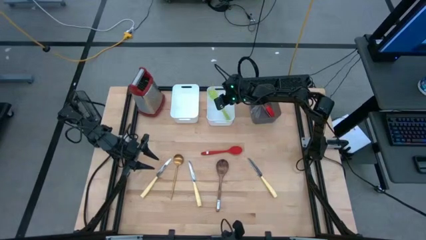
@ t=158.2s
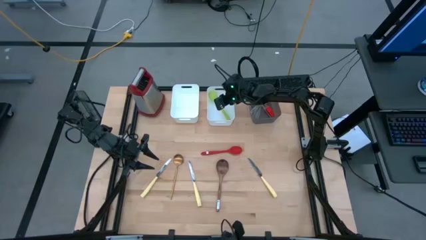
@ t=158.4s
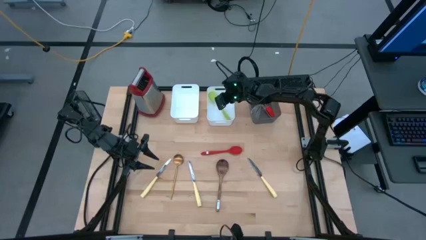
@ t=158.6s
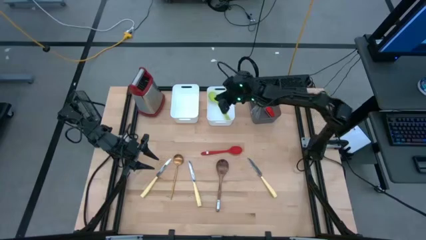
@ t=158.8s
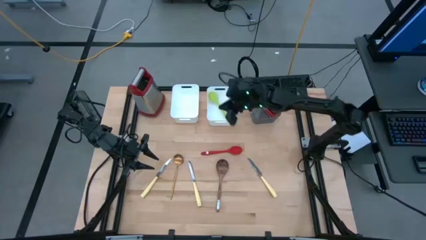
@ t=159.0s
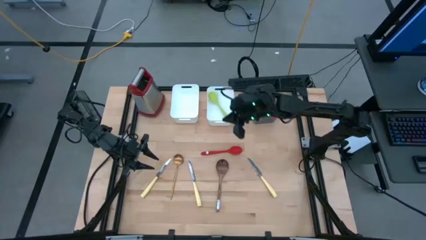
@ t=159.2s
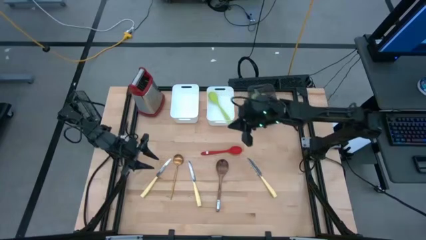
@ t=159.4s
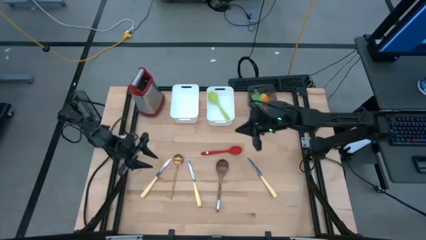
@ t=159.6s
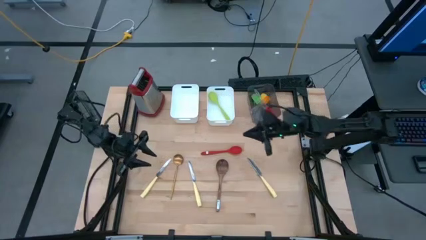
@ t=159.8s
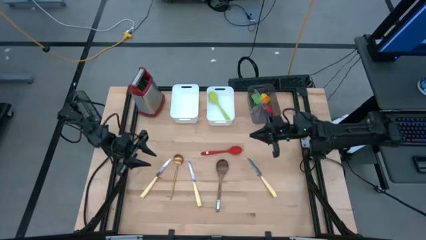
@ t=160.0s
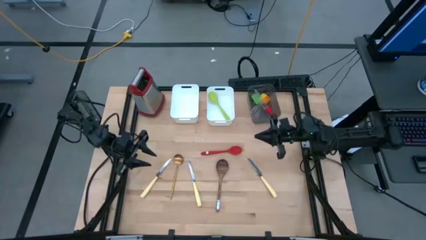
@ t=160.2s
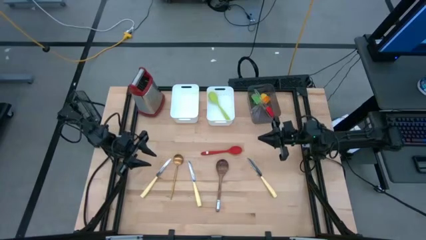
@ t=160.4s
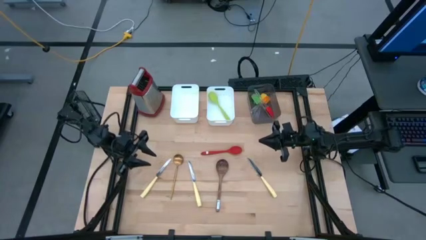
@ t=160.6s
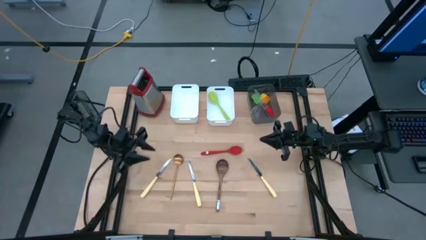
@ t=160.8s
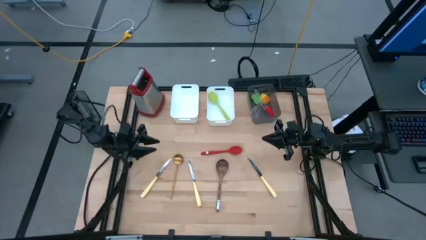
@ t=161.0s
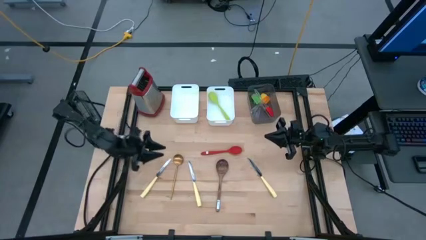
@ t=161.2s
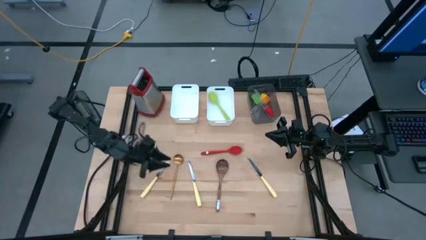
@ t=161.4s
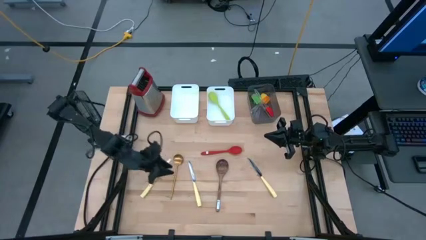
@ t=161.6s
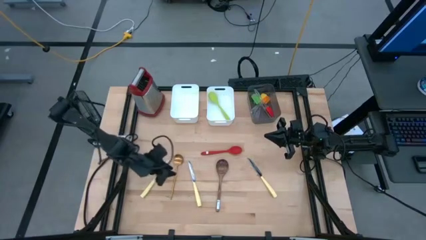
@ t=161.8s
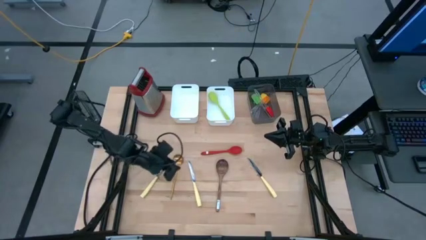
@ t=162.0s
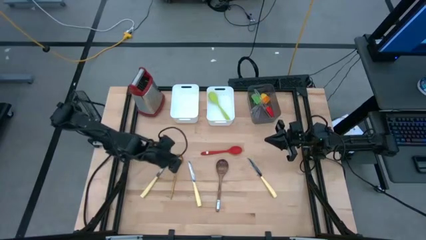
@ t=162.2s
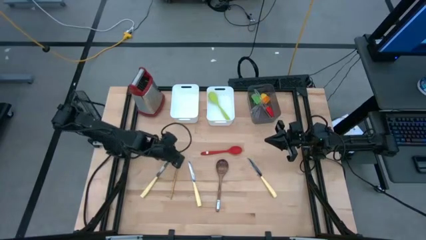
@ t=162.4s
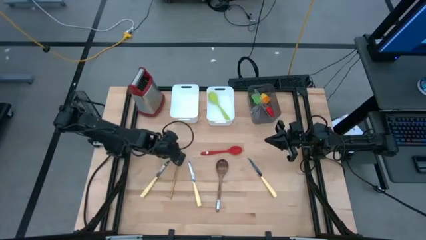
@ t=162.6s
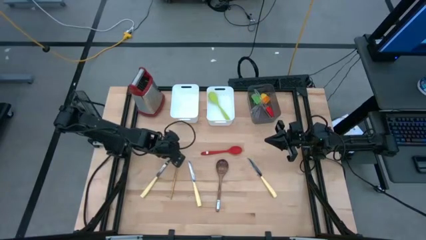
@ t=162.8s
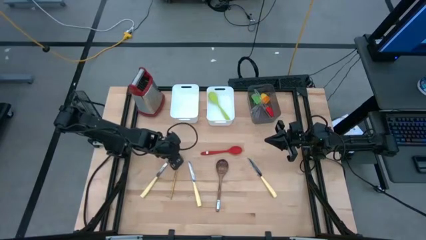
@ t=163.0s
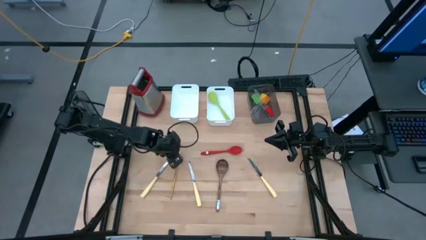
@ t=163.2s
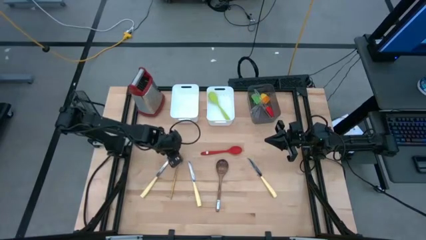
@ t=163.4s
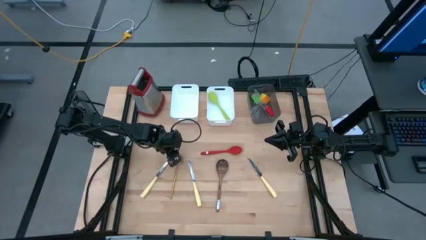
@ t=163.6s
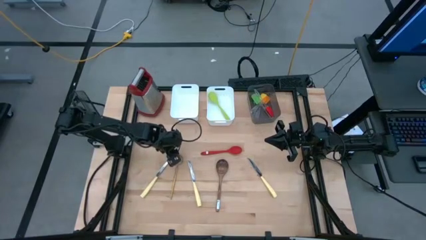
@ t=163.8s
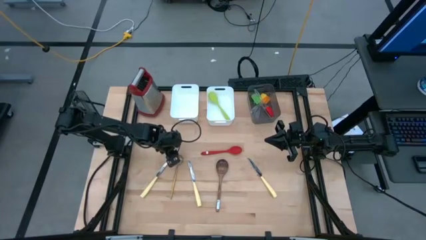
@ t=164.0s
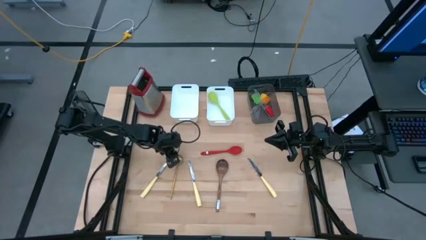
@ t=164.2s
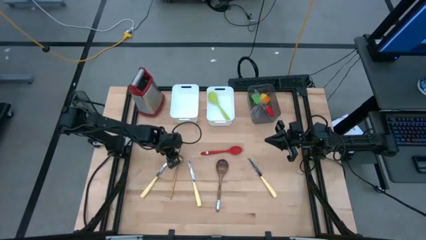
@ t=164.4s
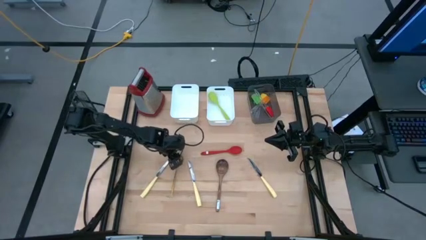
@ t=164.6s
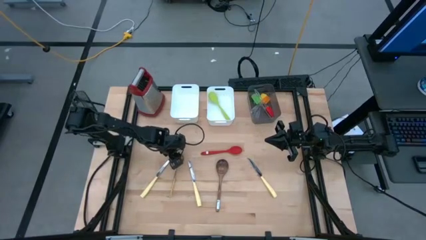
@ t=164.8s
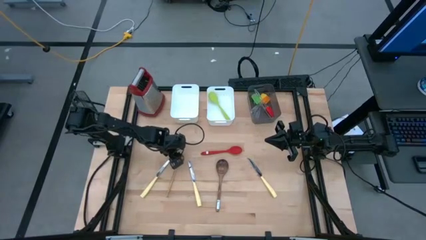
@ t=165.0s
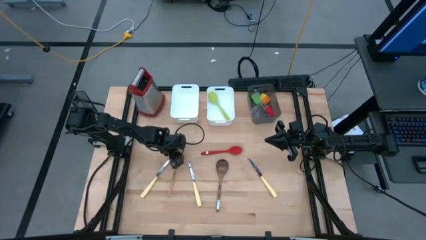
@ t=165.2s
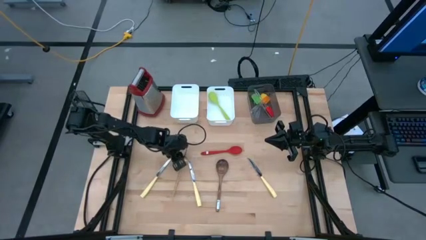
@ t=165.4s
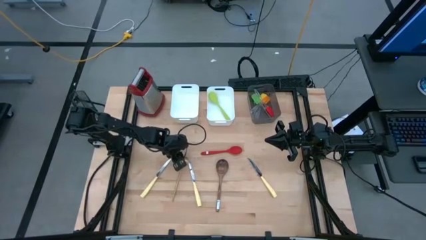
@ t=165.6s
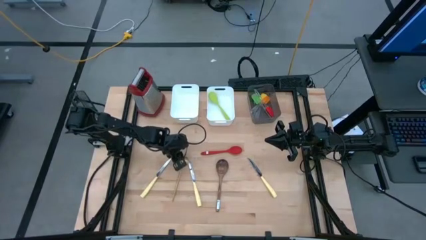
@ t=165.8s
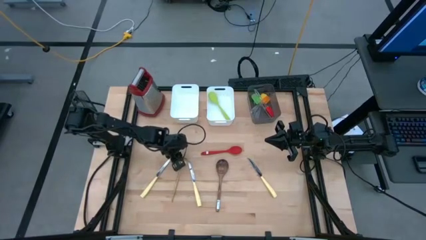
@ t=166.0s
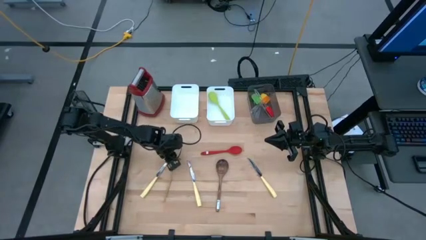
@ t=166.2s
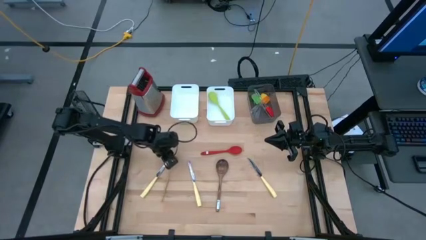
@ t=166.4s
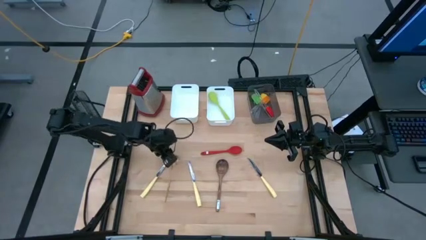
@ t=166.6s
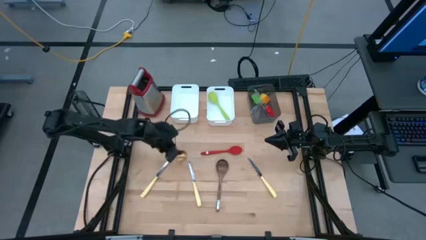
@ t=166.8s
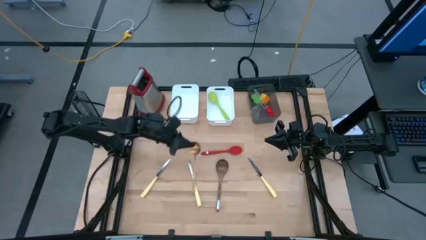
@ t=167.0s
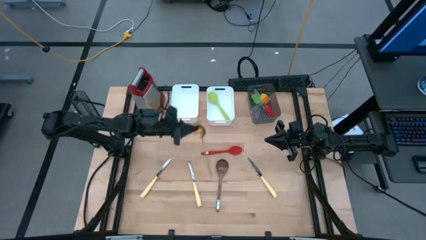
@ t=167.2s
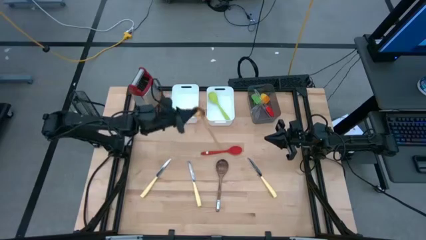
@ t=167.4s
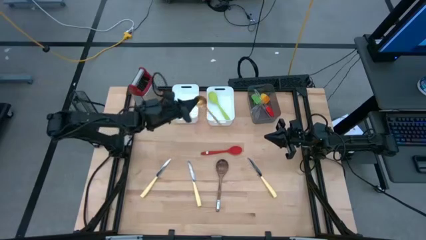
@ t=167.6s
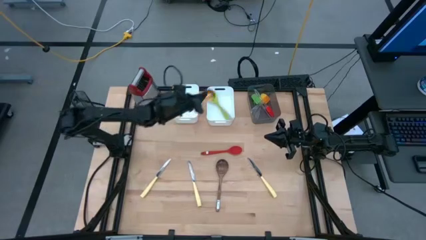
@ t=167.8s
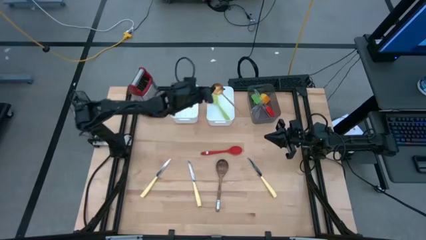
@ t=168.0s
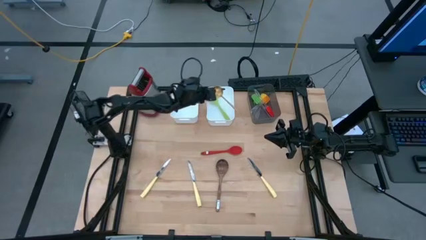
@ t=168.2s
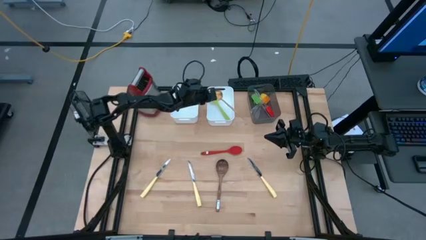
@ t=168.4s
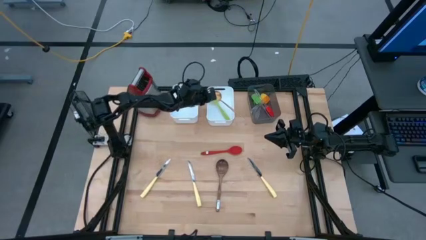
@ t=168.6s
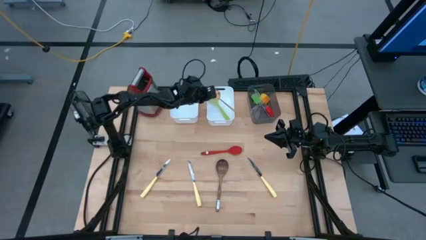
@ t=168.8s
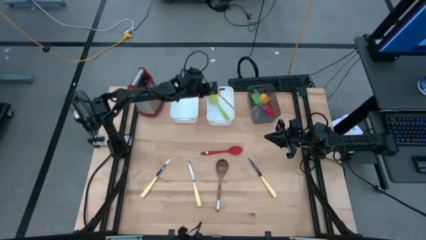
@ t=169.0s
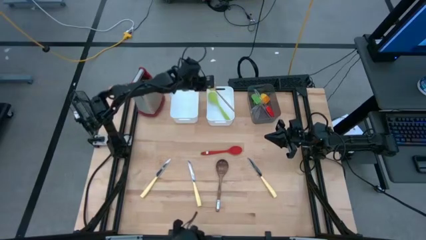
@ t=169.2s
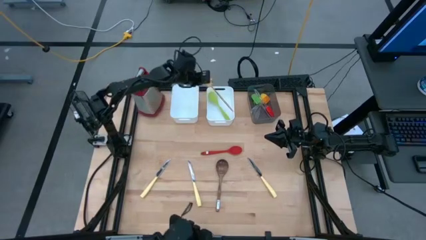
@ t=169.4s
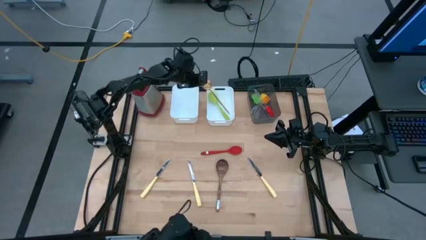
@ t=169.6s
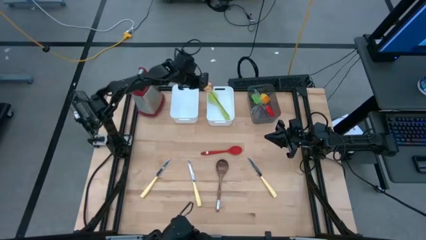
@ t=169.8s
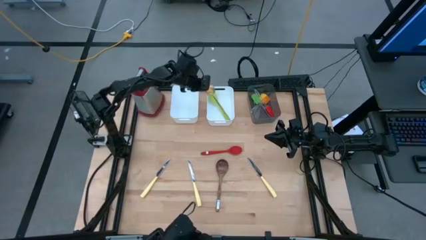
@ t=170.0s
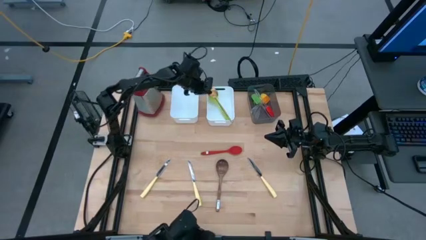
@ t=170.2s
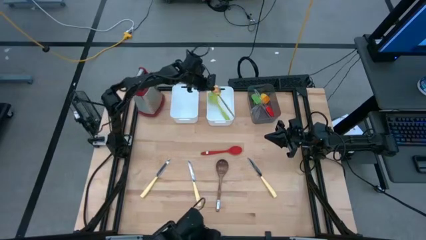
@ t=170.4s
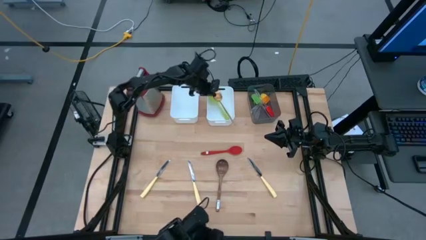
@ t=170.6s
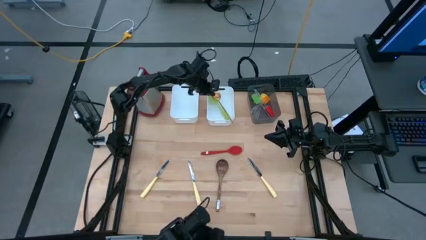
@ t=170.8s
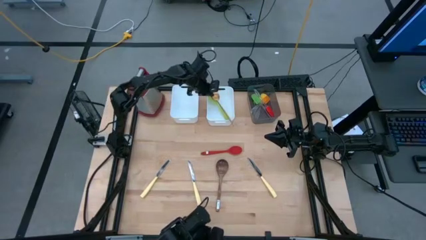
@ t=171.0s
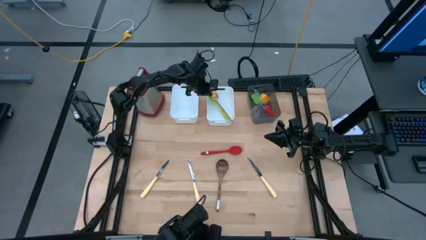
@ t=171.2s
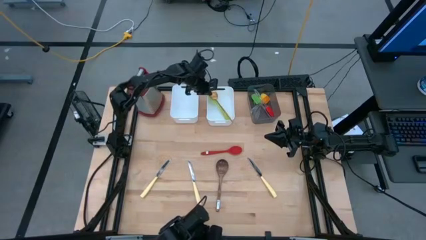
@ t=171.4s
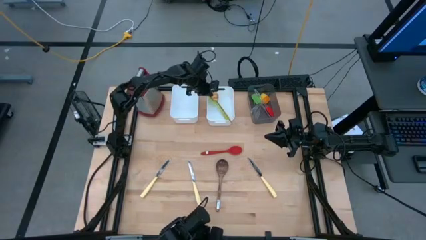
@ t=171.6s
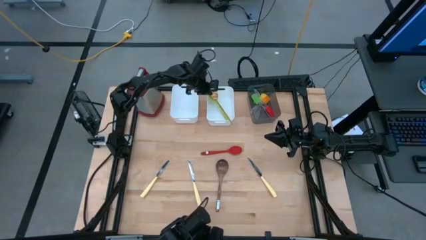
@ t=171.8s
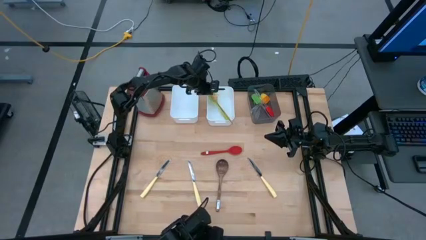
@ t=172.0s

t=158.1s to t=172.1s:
Task: Pick & Place Kitchen Items
Put the gold serving spoon into the right white bin
